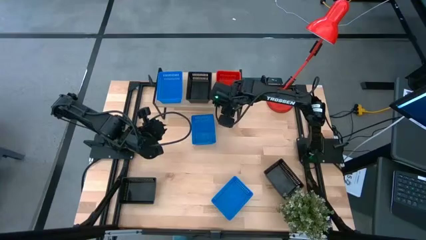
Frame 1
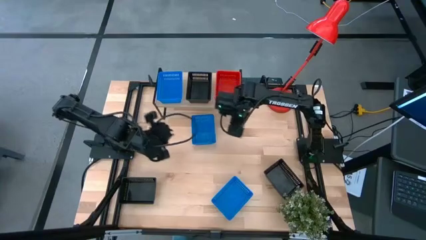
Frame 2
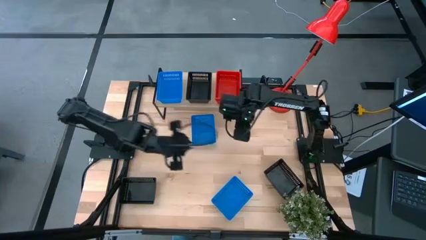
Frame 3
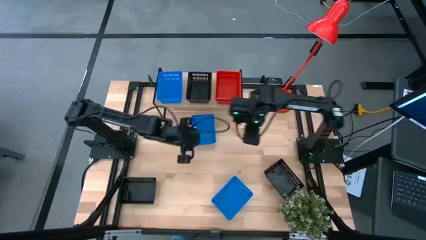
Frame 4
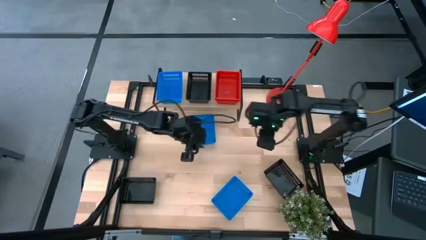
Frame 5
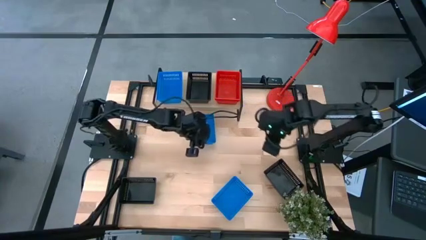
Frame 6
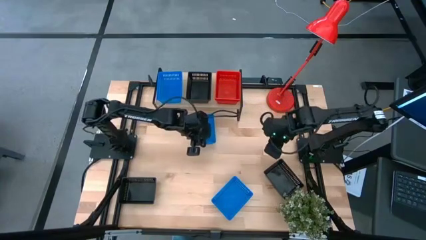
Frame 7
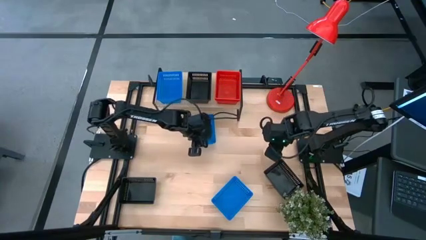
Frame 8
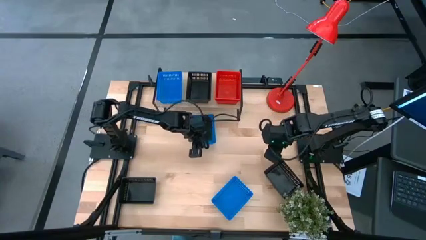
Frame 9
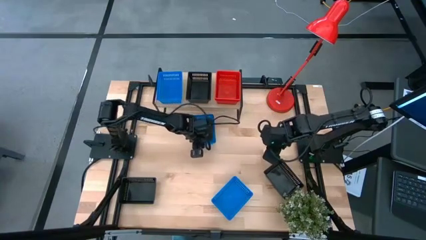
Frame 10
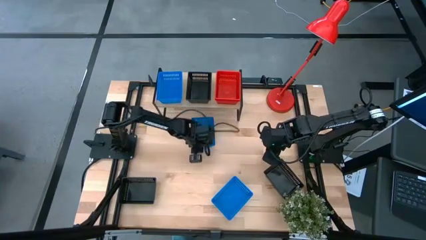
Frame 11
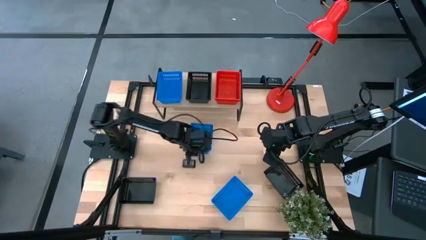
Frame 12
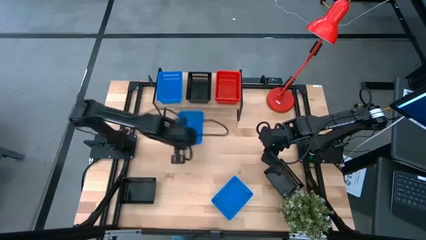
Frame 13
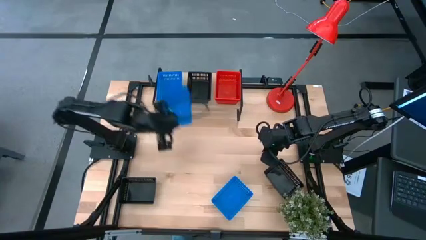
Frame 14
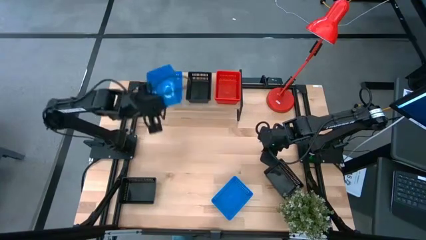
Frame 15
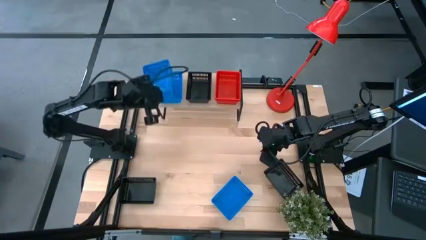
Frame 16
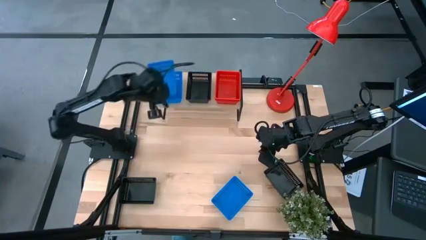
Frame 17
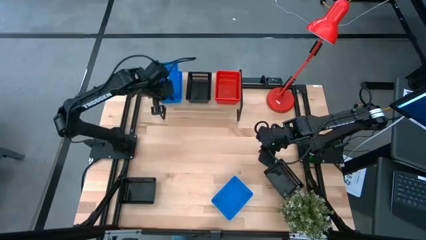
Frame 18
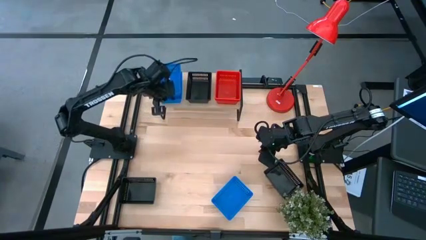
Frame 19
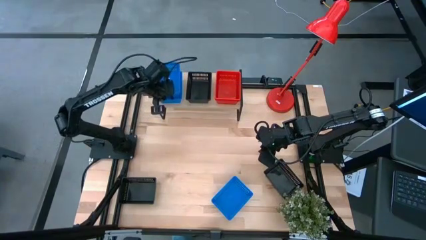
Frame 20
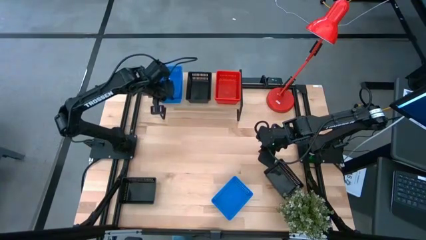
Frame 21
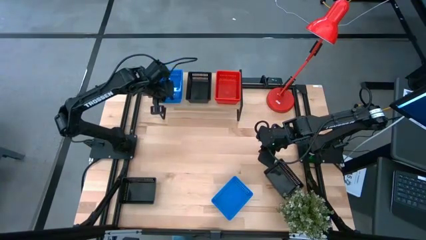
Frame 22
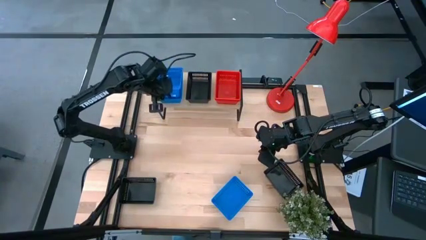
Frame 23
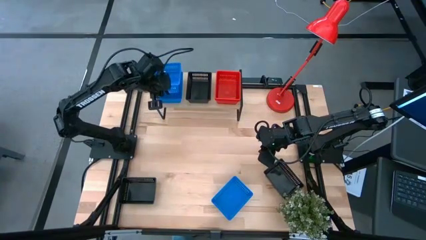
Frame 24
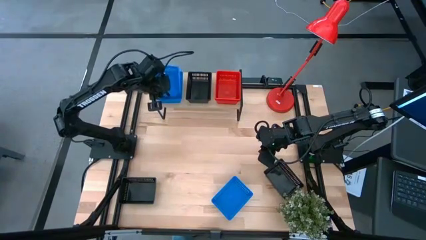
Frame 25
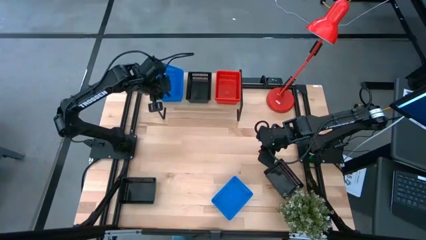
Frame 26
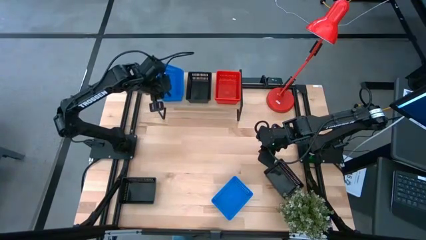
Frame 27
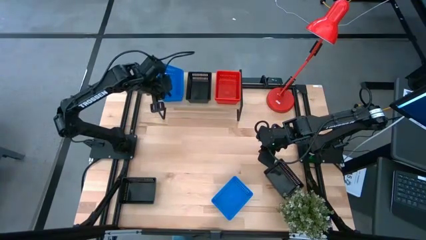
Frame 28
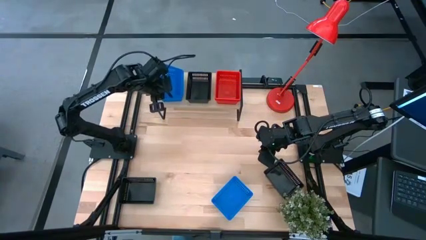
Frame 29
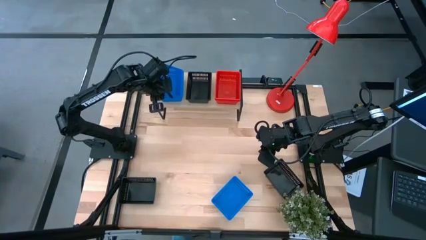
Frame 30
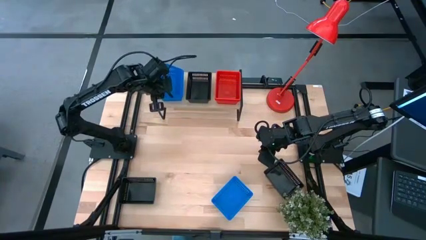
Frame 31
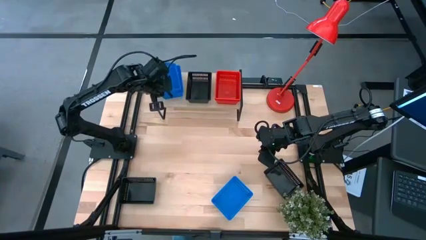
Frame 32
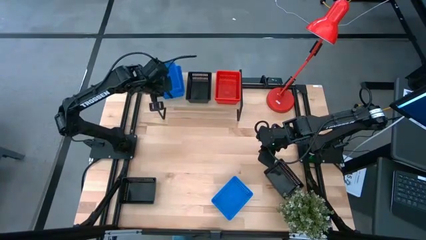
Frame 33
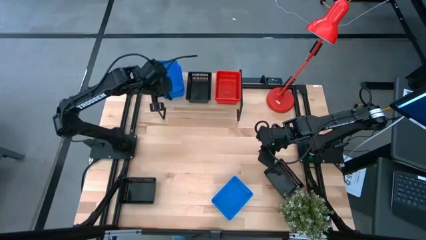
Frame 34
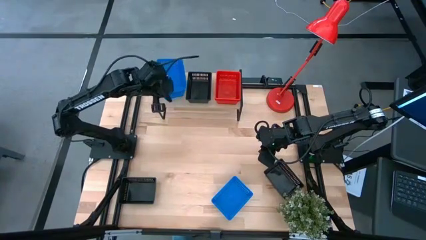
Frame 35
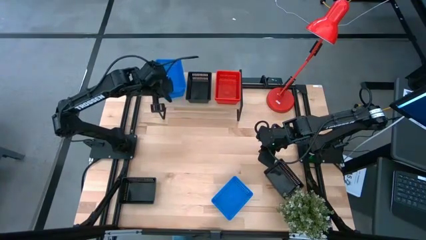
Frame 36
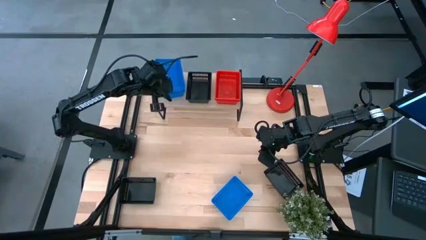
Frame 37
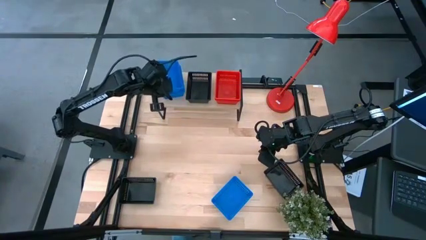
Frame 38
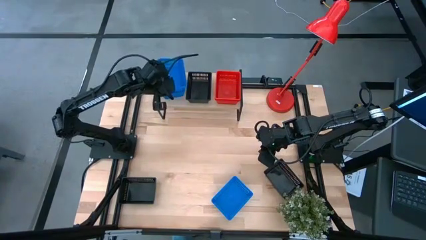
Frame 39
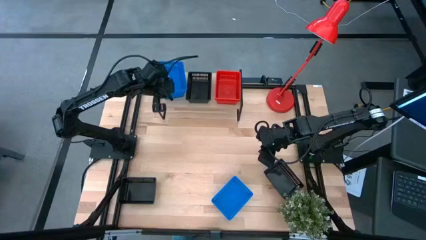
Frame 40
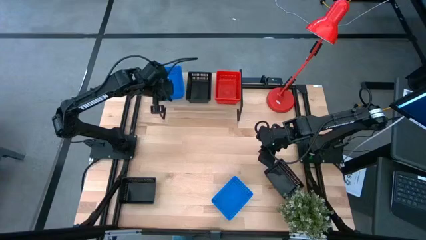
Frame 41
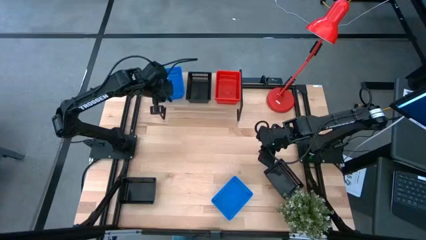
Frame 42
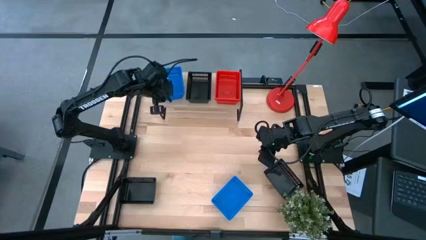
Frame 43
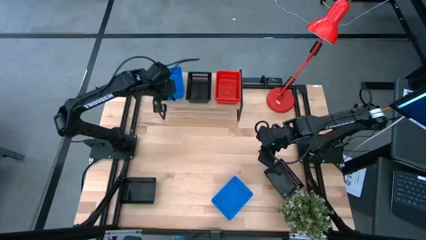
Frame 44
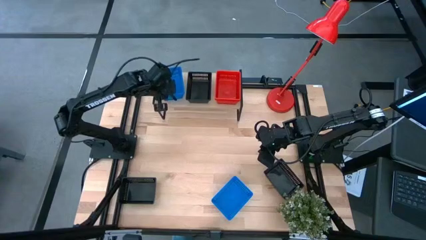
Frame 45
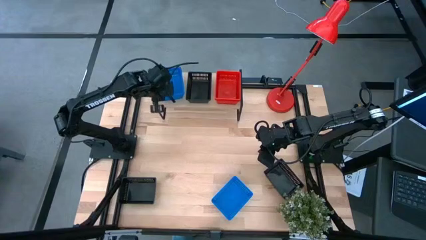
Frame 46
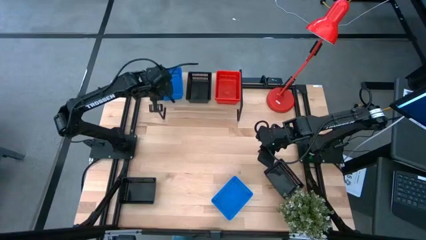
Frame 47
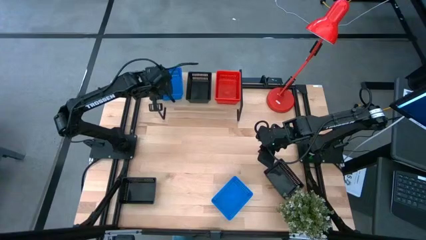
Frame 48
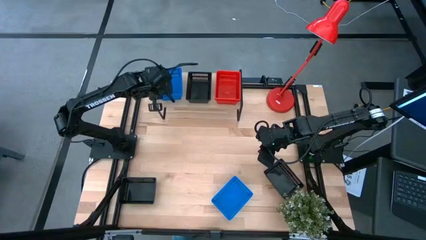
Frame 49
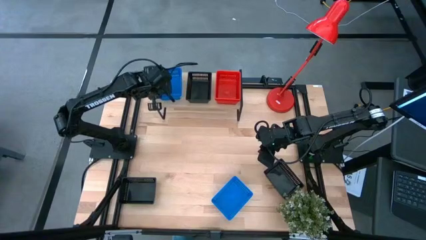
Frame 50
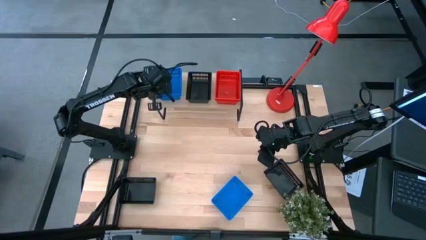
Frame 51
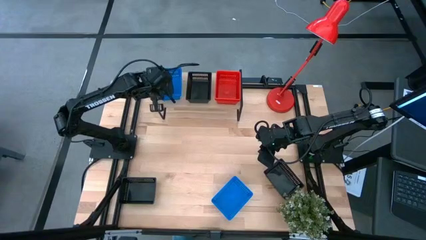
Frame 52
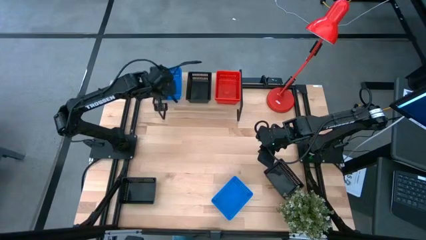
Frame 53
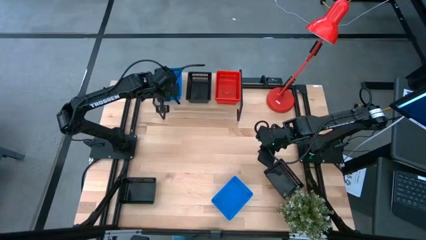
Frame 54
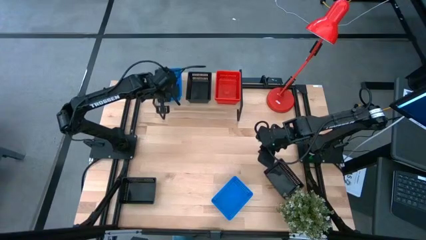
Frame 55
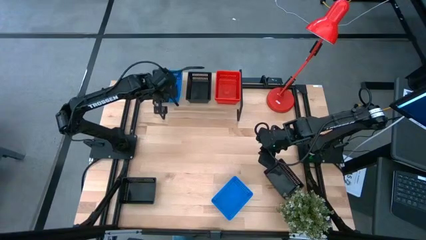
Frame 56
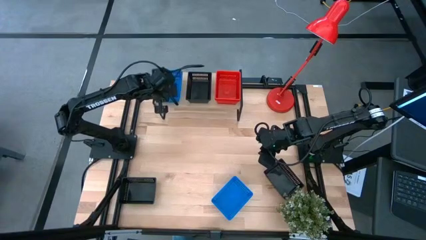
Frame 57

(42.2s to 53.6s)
Task: Stack baskets on shelf by color
Stack the top blue bin on top of the blue bin on the shelf

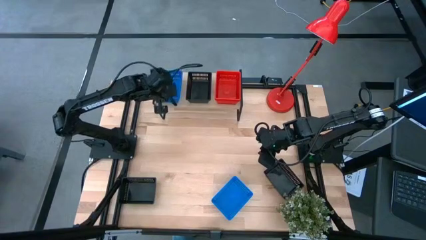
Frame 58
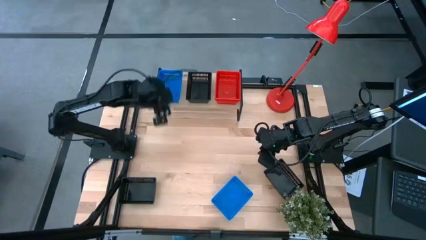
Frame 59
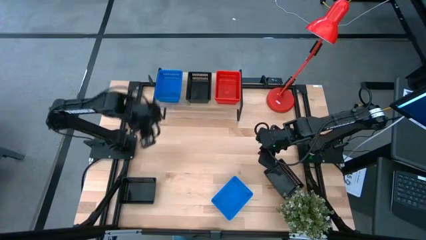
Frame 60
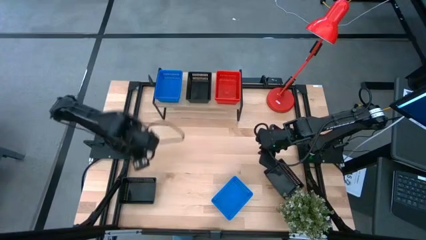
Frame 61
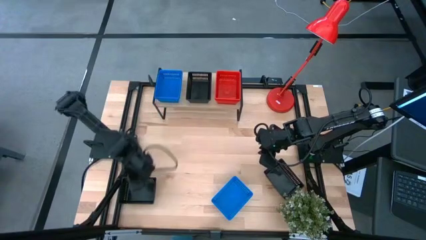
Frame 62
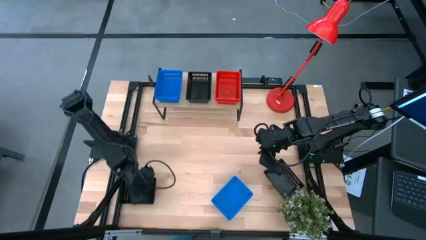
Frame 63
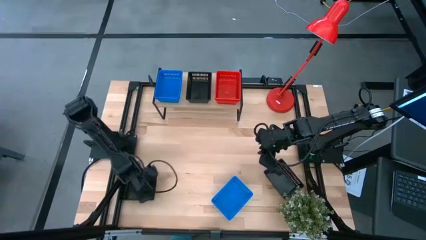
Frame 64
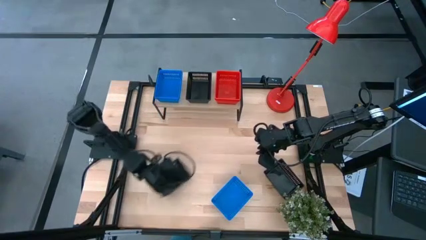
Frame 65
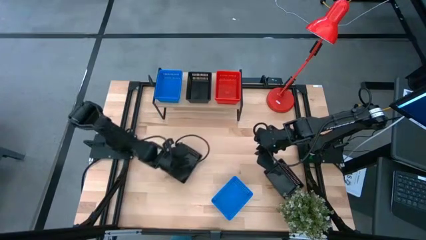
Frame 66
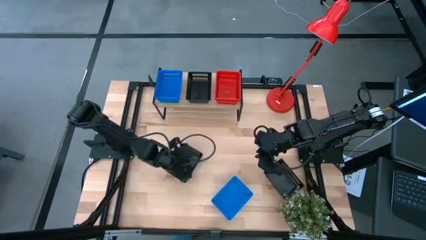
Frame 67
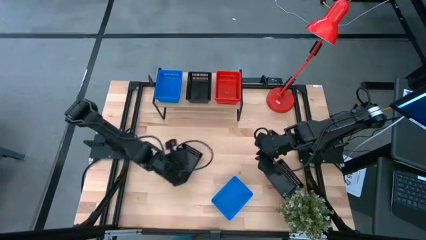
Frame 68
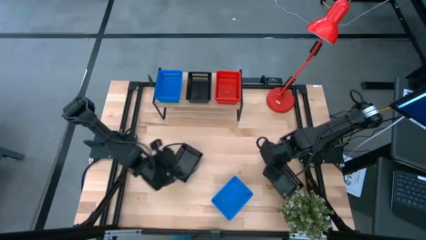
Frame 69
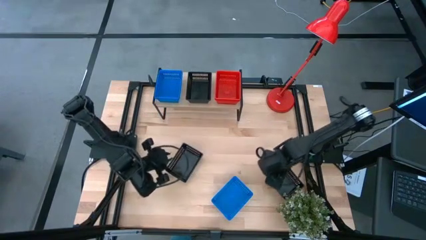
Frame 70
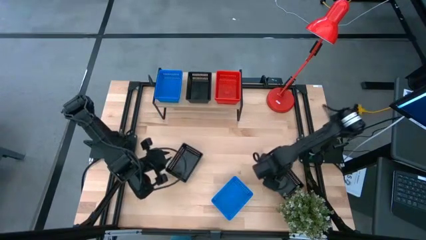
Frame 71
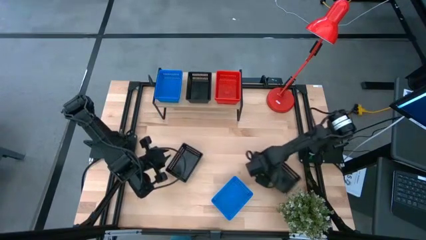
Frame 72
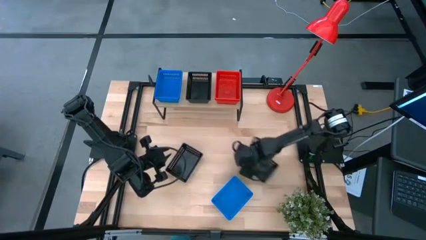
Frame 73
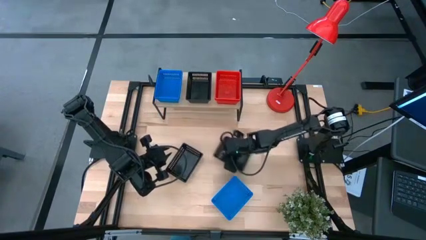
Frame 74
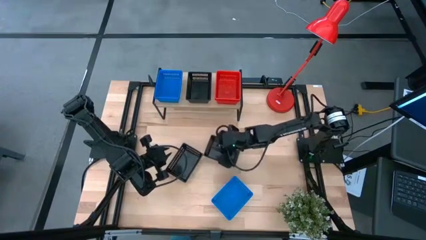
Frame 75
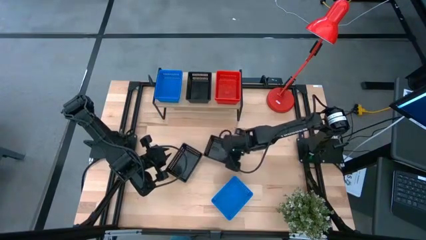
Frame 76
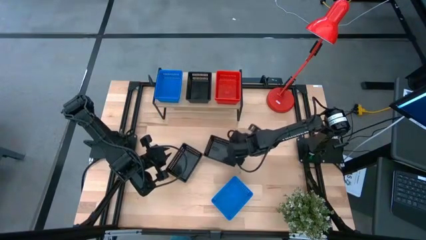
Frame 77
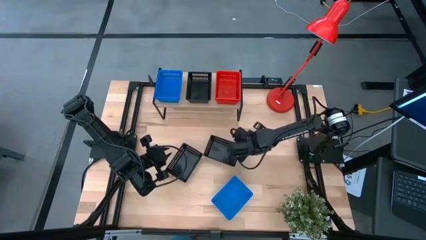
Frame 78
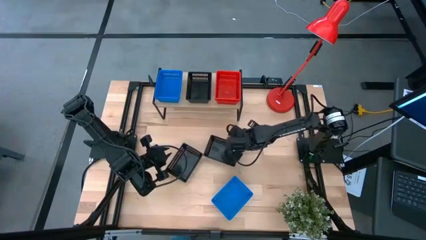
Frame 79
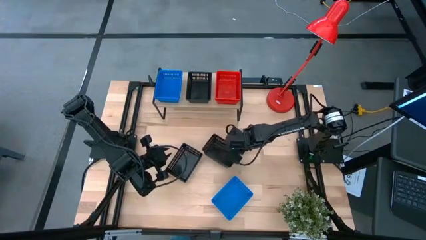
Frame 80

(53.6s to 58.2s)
Move the black bins to the center of the table
